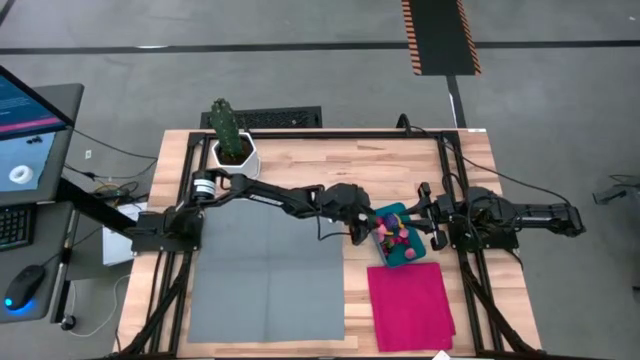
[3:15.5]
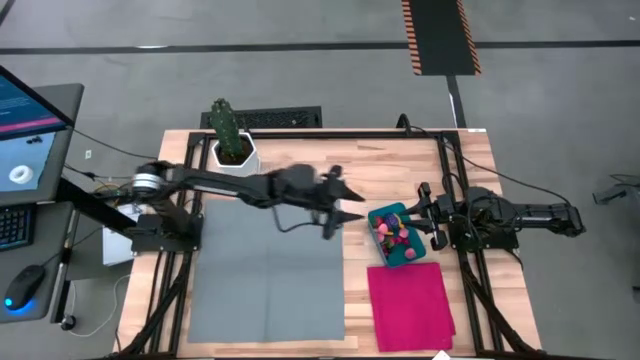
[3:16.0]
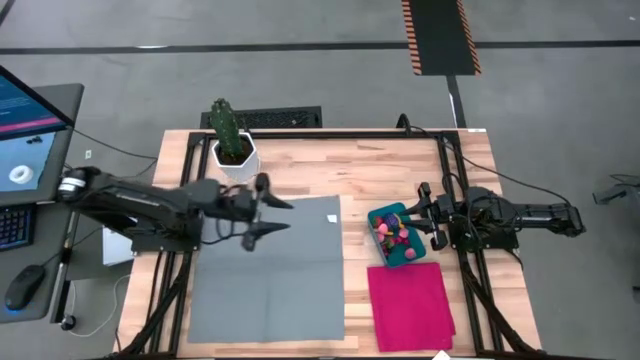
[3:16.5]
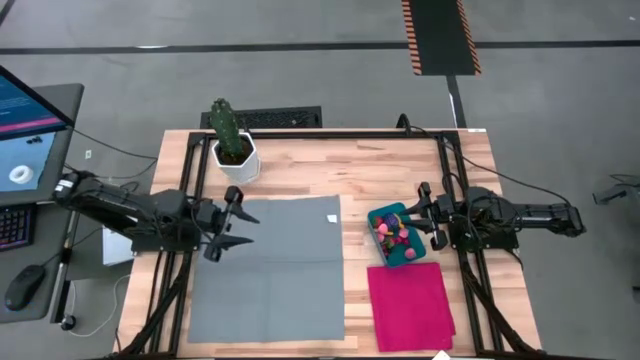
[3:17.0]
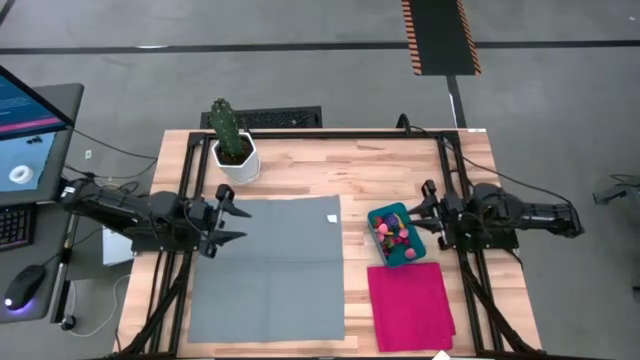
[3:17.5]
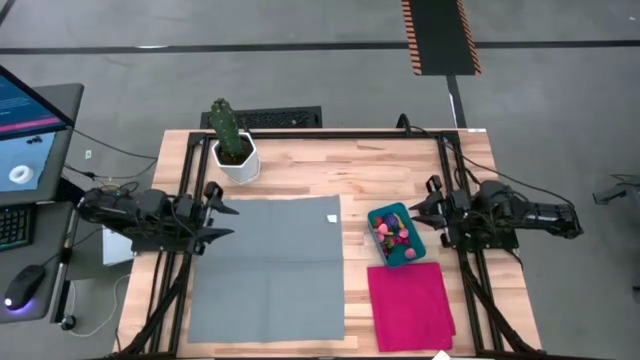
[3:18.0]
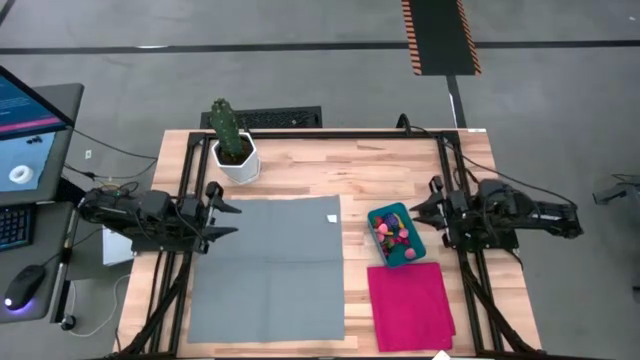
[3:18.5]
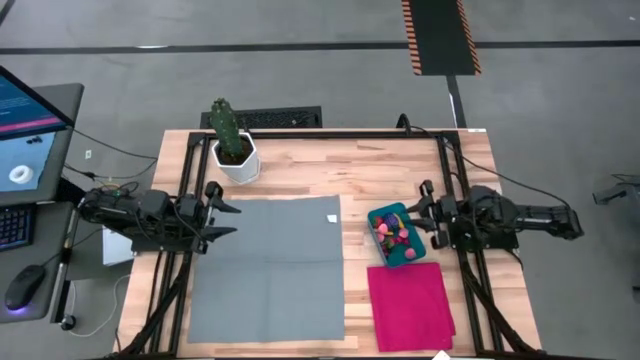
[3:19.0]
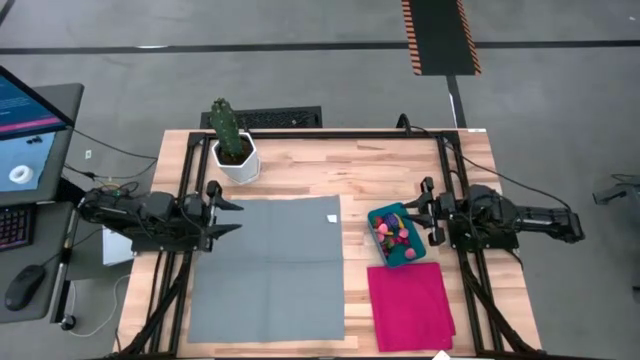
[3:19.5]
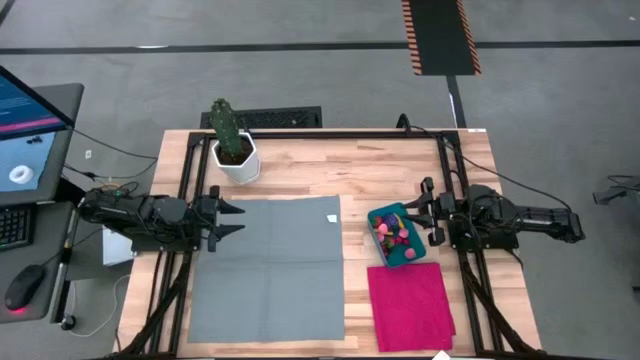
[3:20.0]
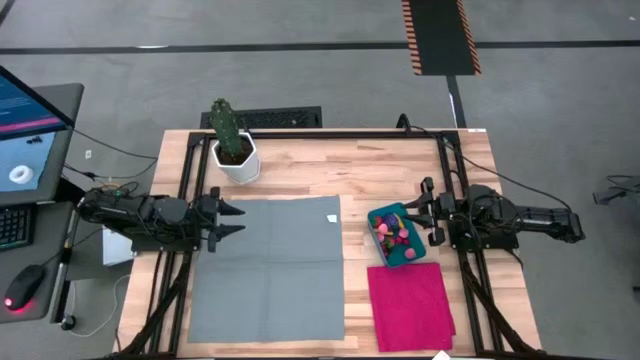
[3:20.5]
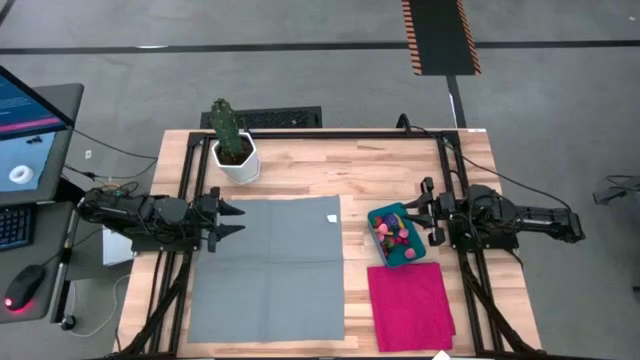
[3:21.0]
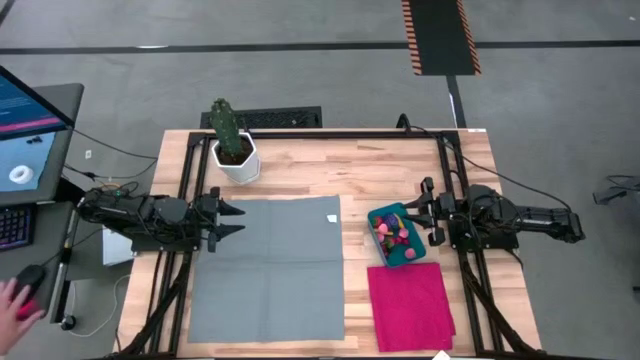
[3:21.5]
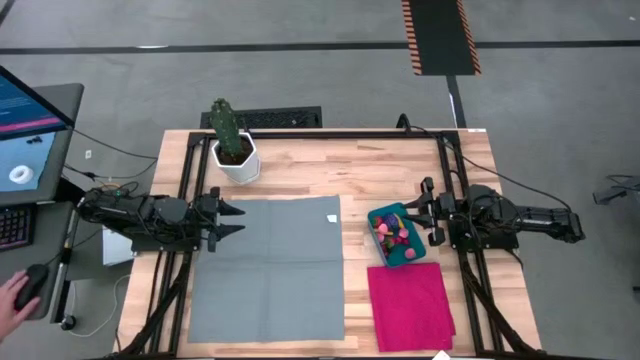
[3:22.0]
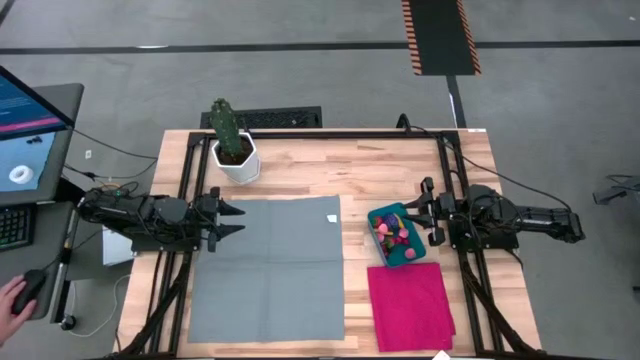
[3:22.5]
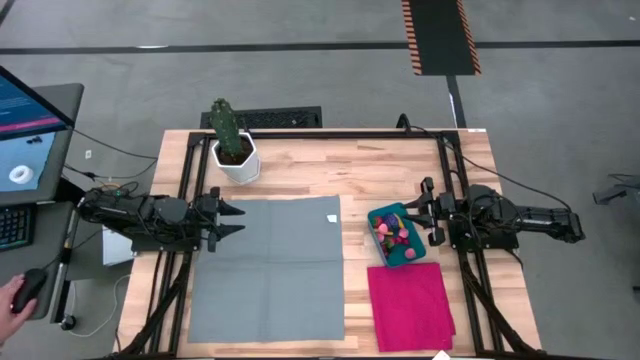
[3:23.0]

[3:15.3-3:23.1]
Task: Pick and placing Produce into tupperware
Return to Home Position

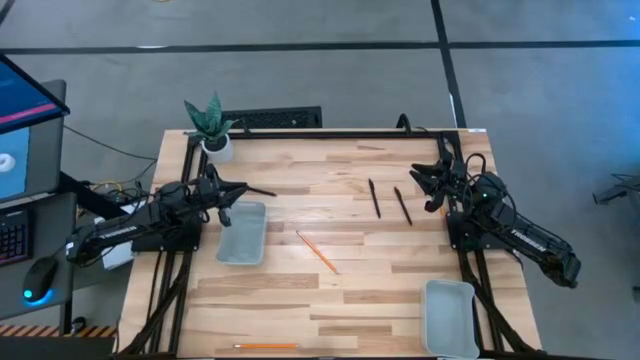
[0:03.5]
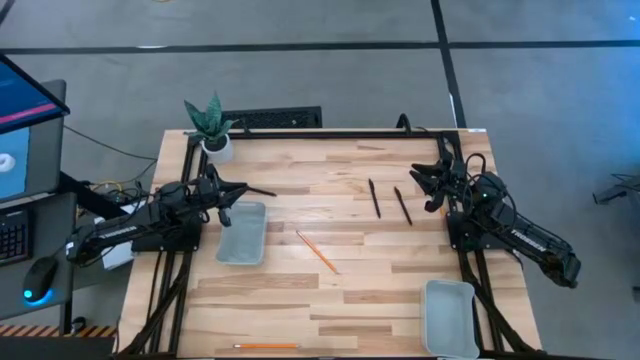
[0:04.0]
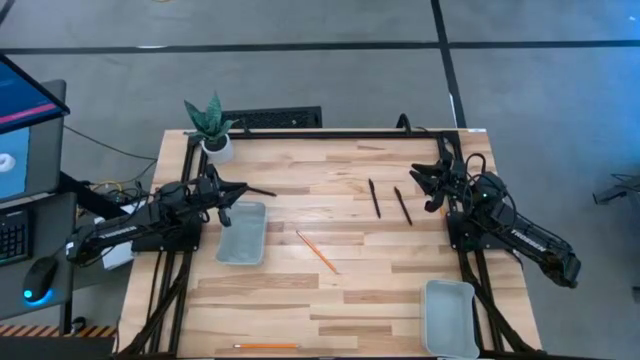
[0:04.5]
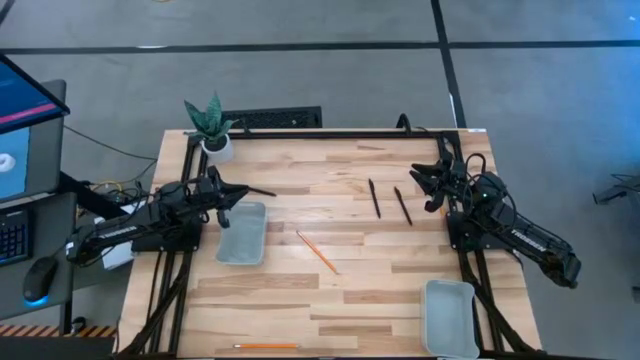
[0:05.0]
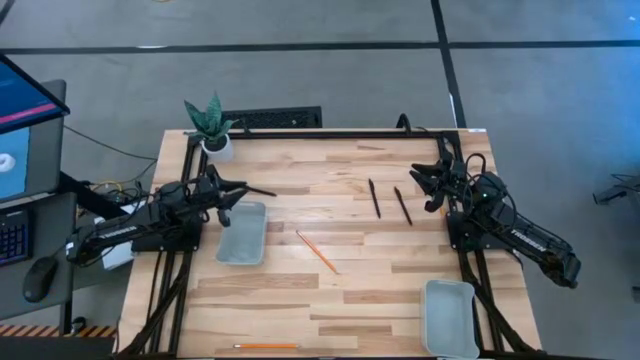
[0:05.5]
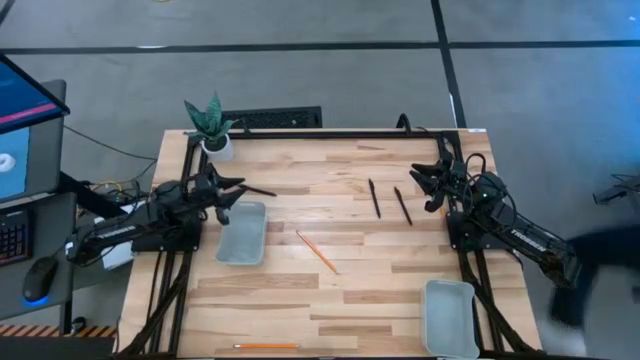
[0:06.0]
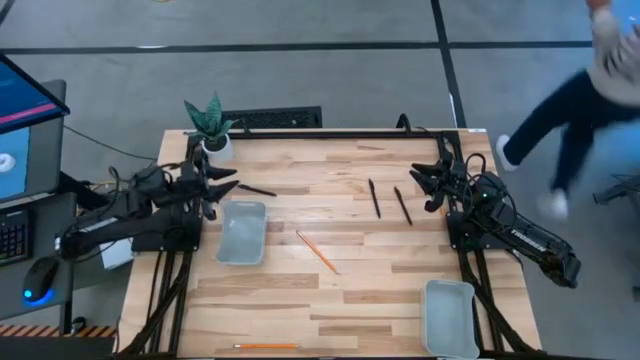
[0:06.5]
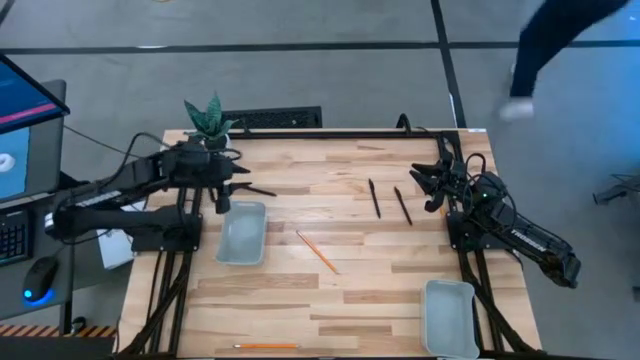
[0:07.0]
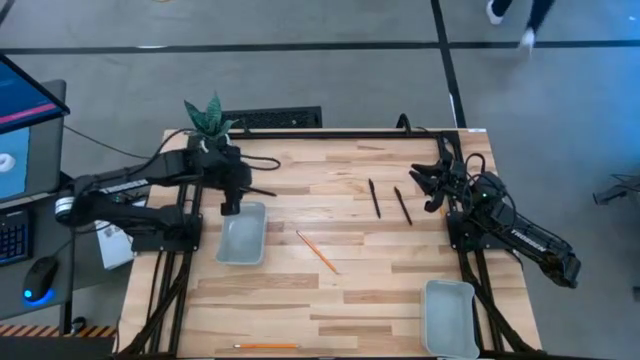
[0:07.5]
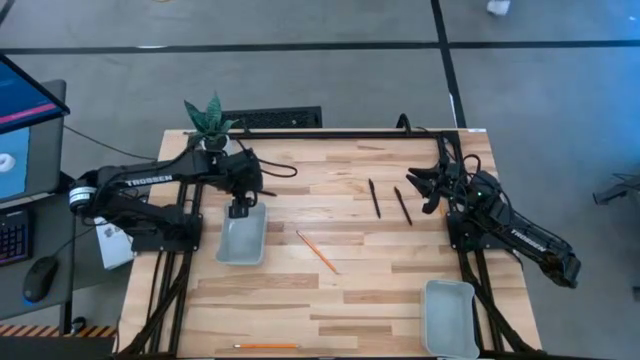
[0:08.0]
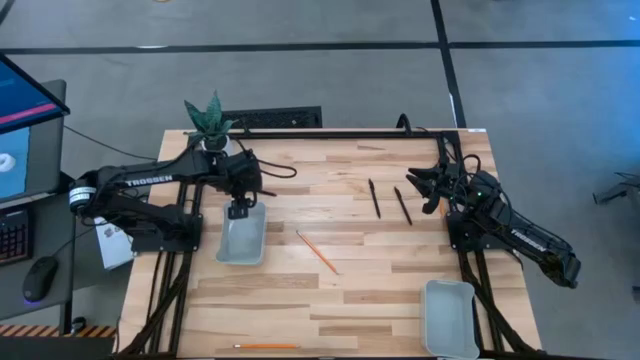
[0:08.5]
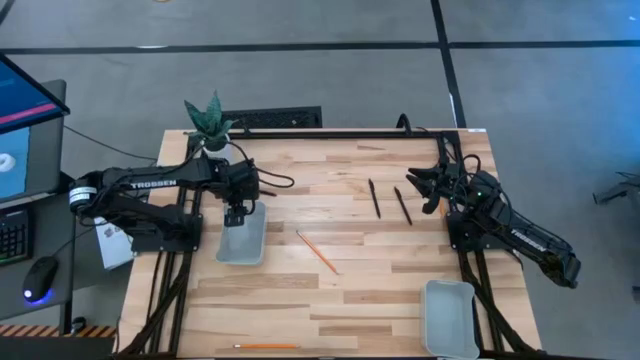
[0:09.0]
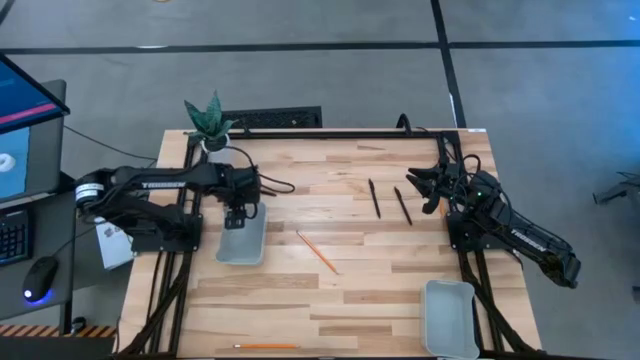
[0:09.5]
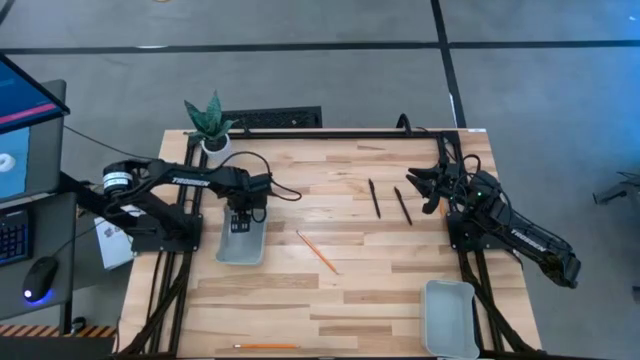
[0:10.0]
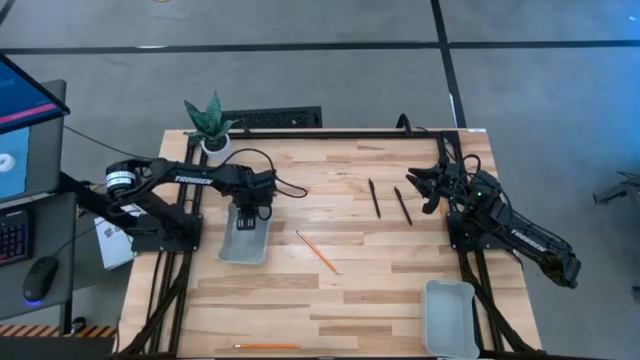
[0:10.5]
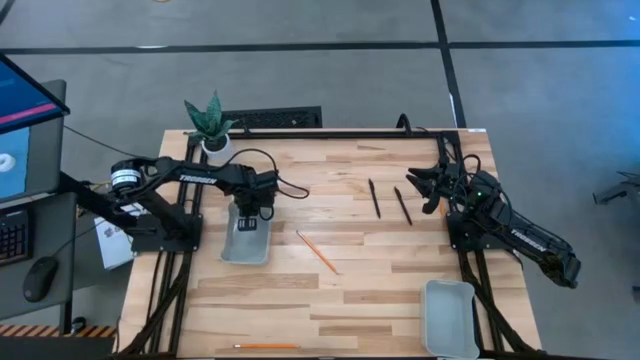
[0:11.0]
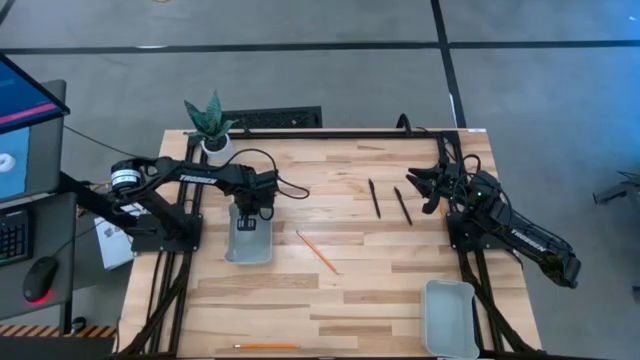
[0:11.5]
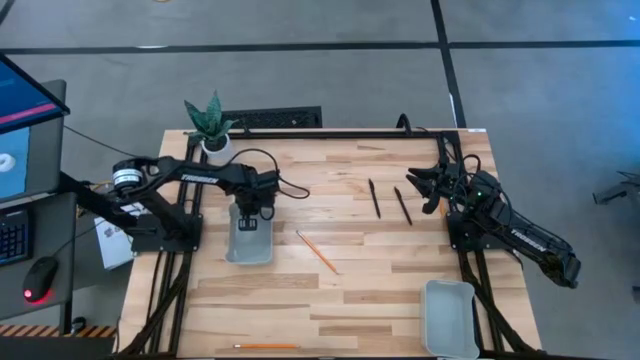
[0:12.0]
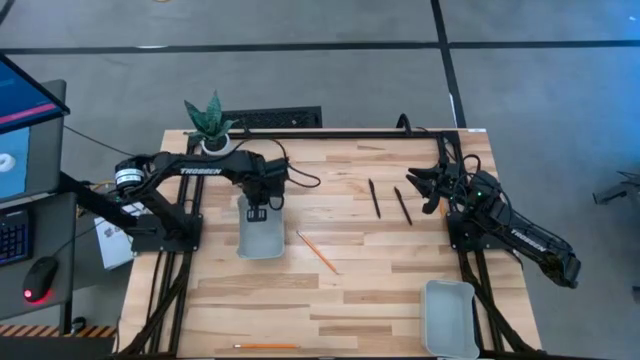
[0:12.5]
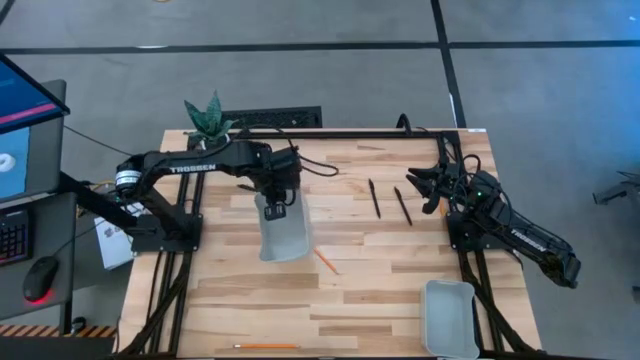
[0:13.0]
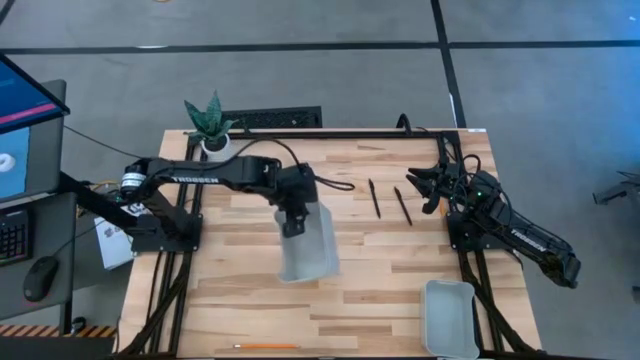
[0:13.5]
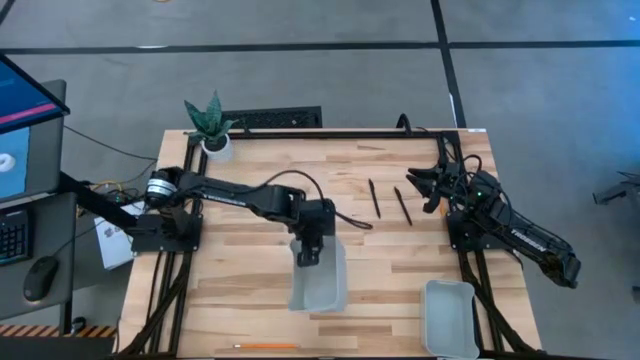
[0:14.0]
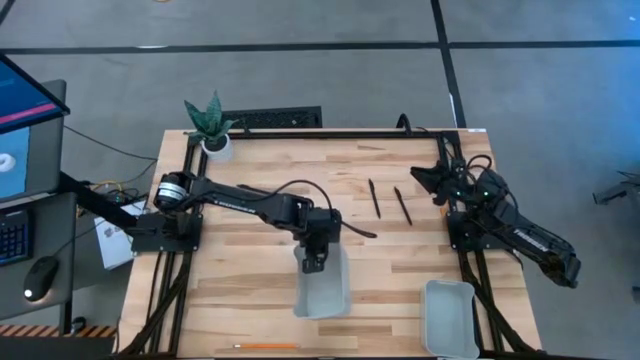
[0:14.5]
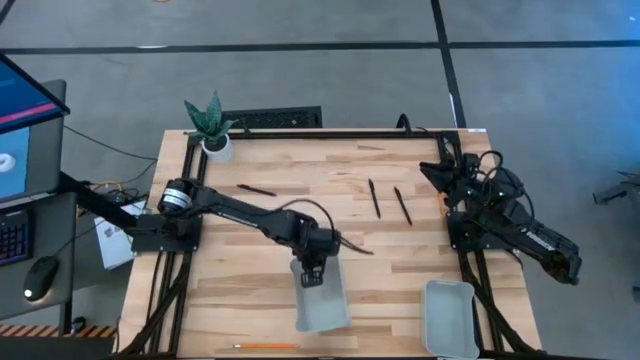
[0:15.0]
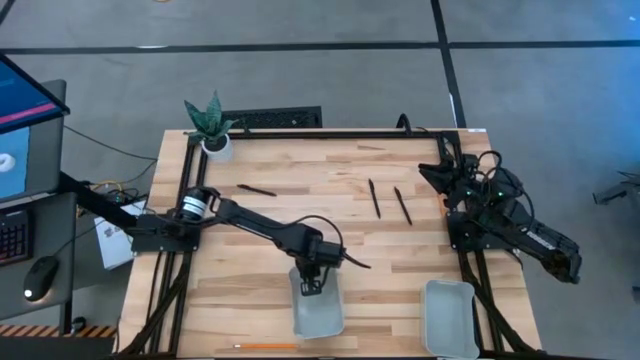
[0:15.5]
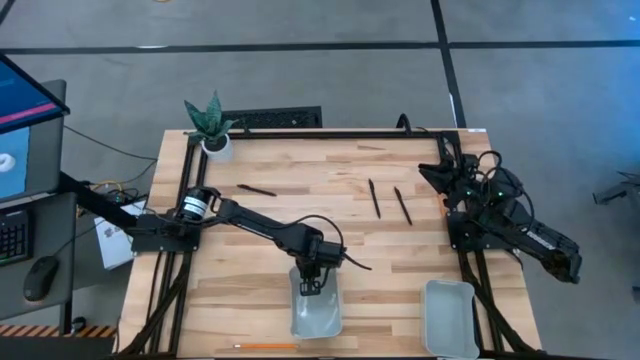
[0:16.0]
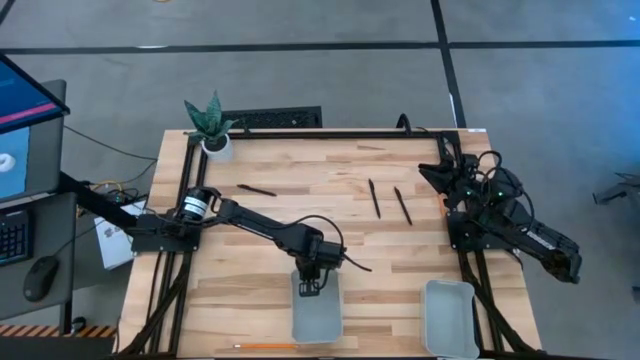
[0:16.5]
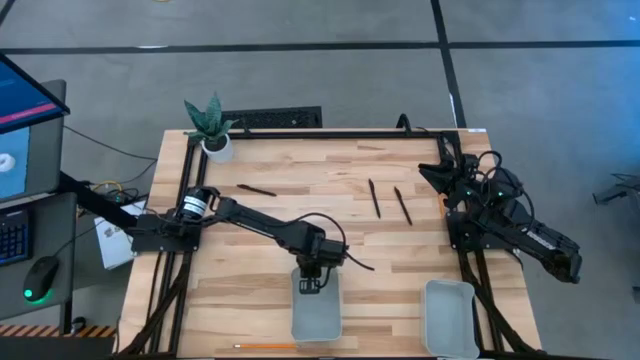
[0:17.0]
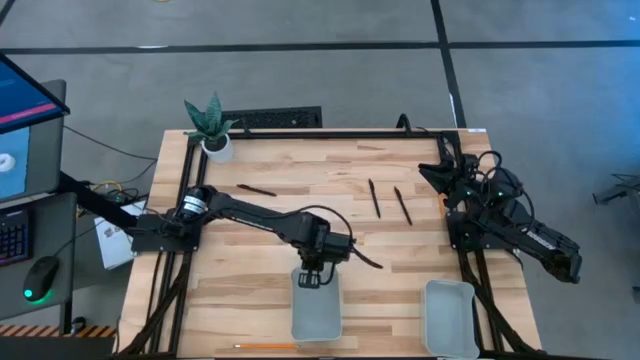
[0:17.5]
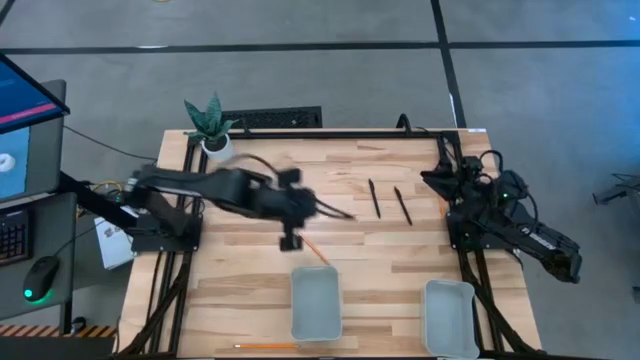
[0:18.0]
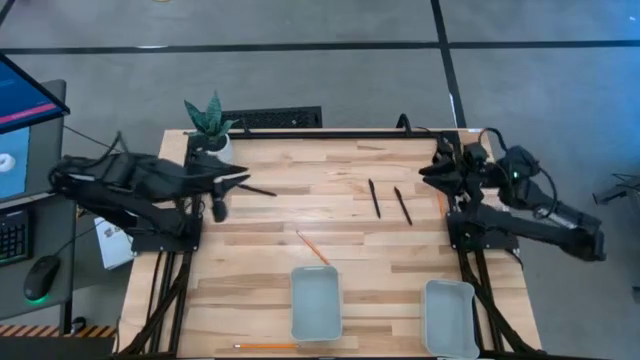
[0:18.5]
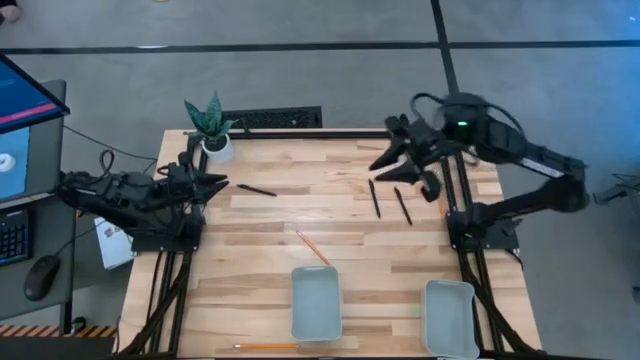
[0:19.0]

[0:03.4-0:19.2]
Task: Sort pens & pencils
Move the left gray bin to the bottom right of the table
